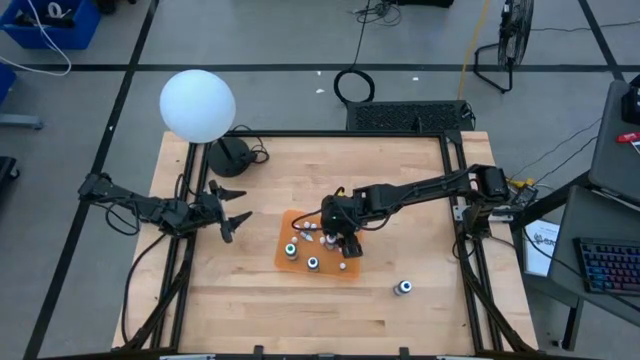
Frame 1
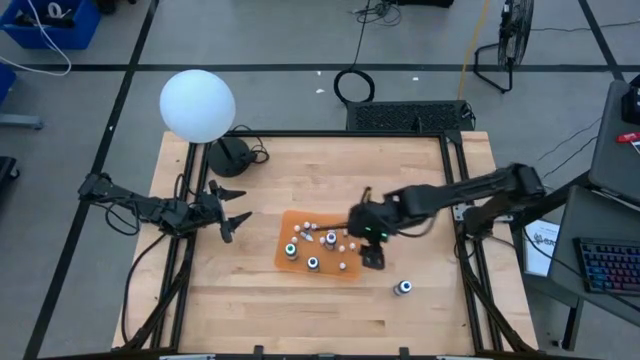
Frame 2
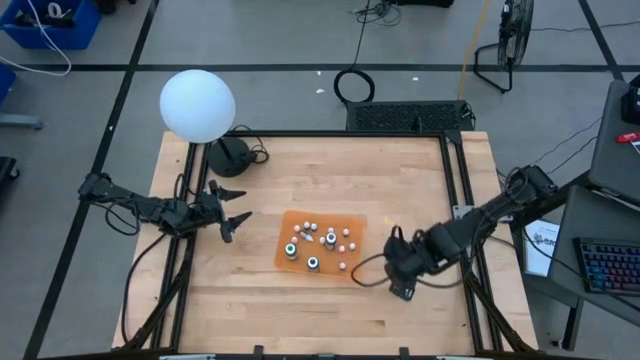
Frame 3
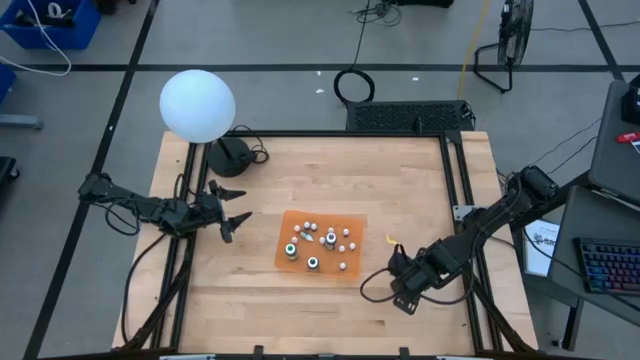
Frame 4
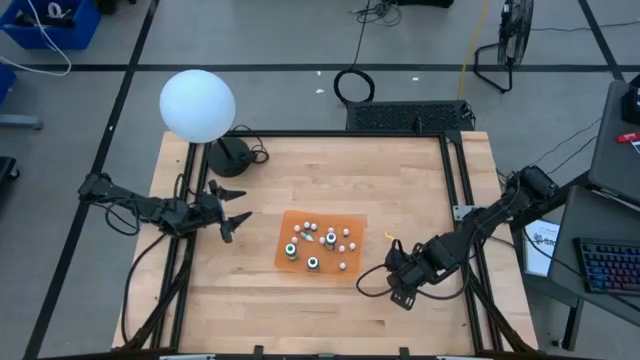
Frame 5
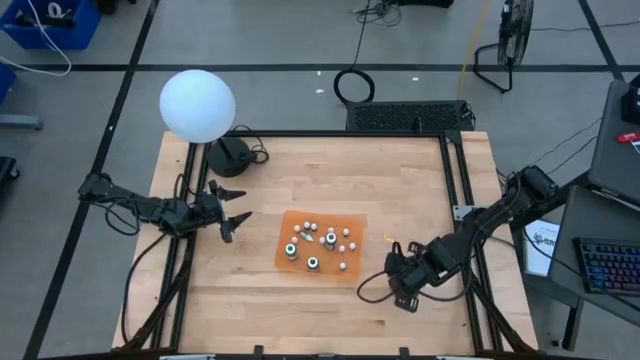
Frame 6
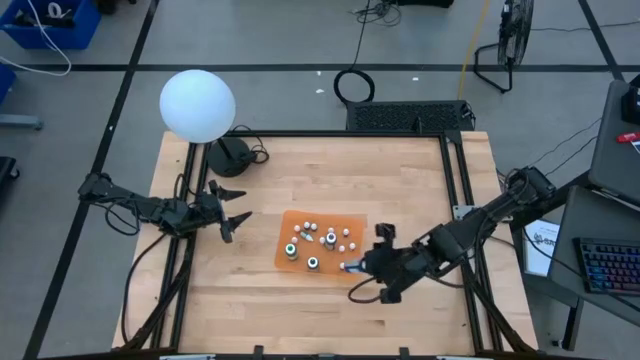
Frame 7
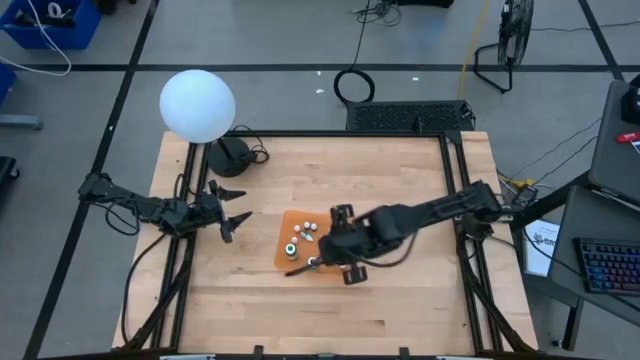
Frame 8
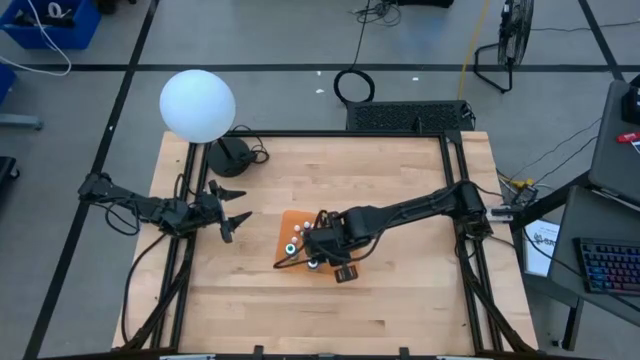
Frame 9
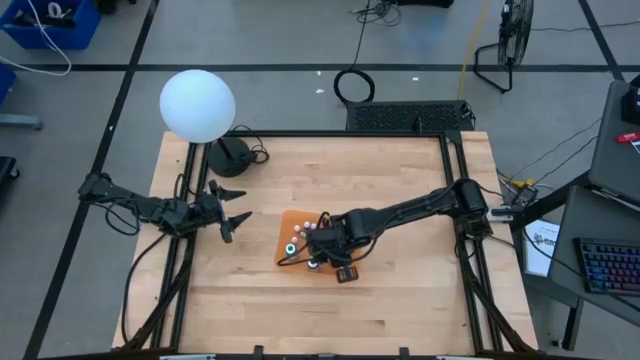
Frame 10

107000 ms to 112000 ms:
Task: Pick & Place food coloring
Put the large blue food coloring bottle into the orange bin

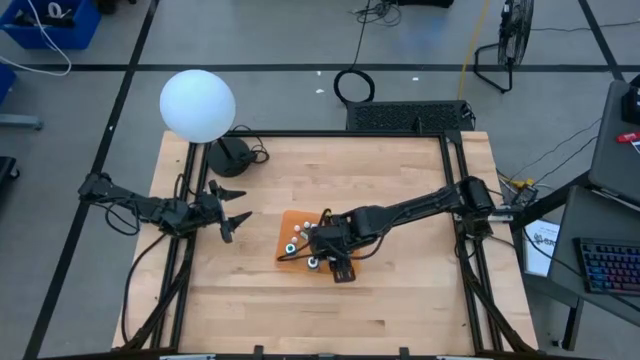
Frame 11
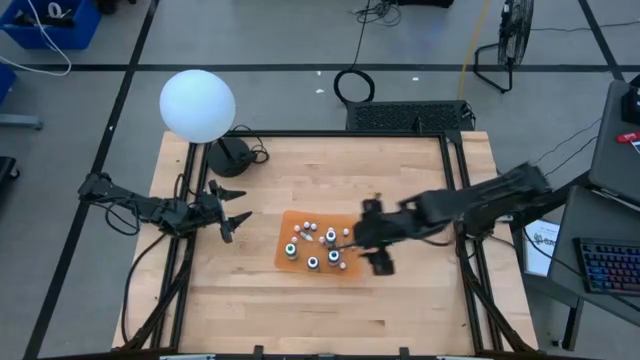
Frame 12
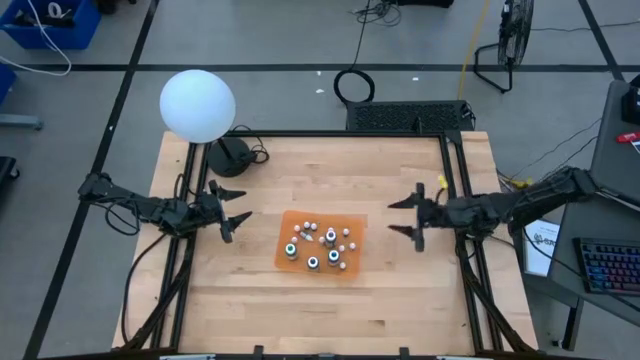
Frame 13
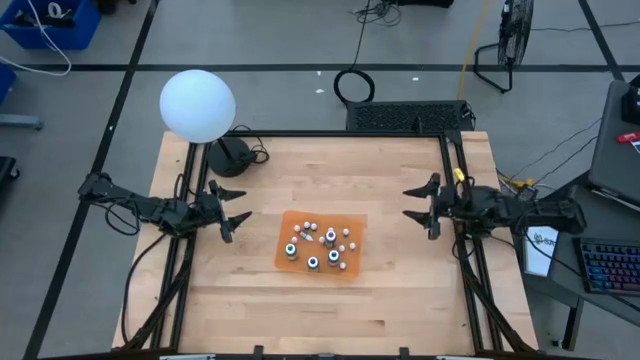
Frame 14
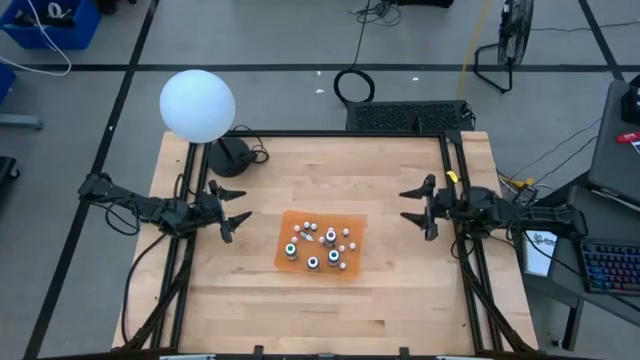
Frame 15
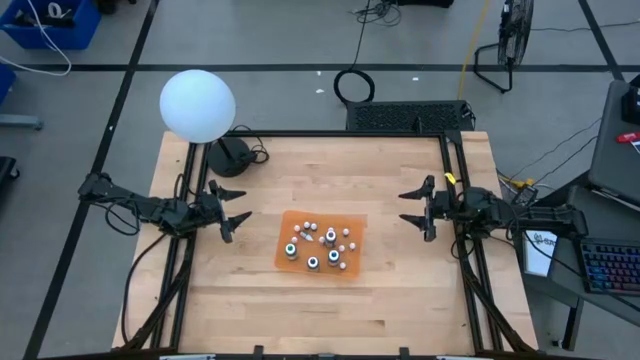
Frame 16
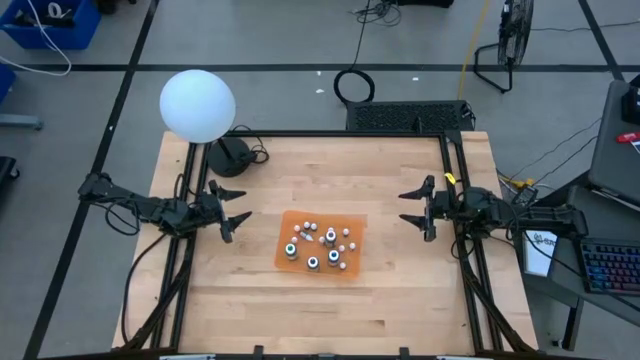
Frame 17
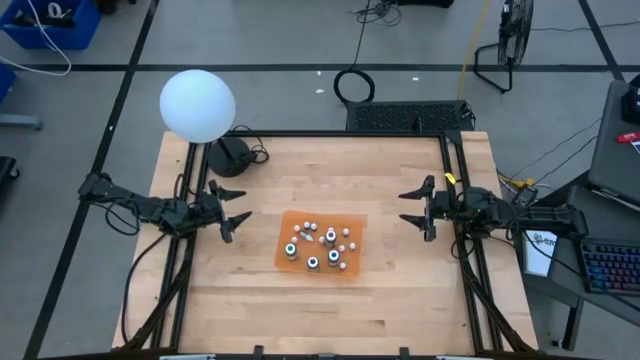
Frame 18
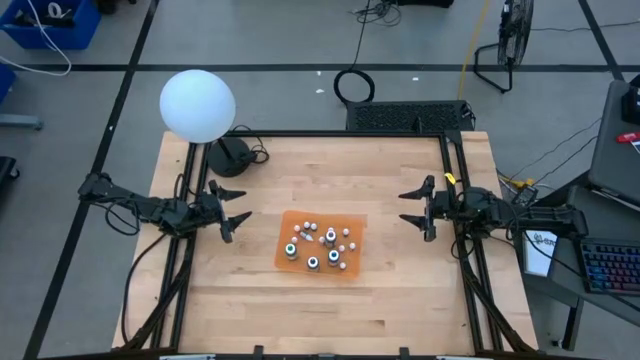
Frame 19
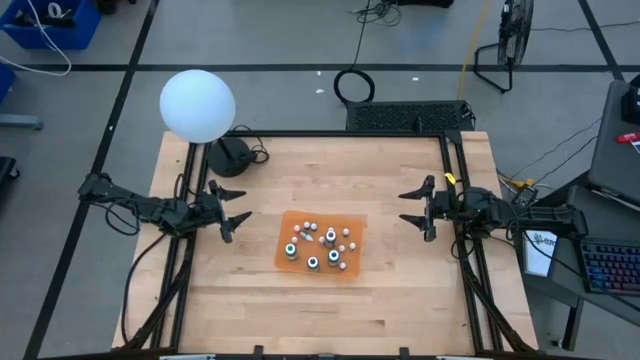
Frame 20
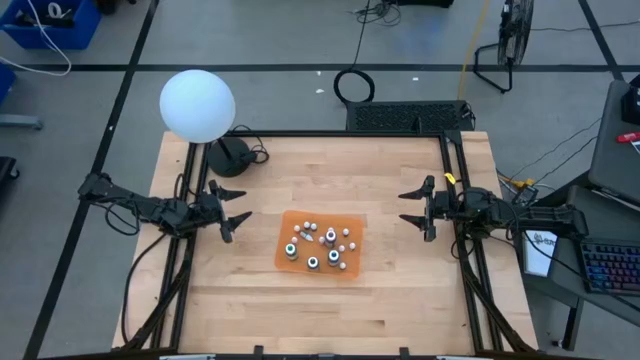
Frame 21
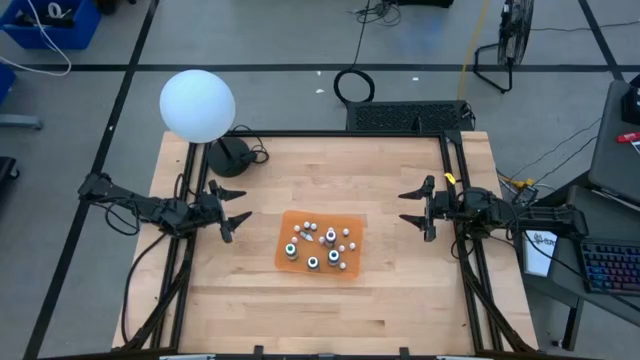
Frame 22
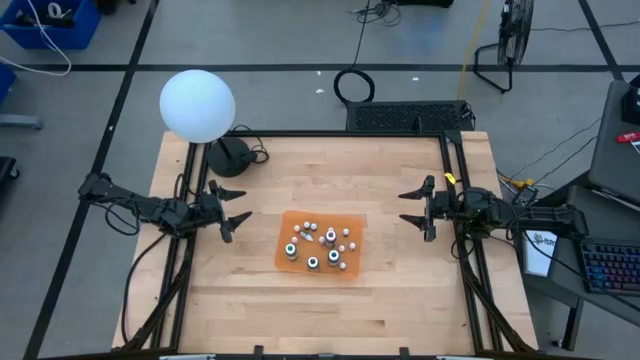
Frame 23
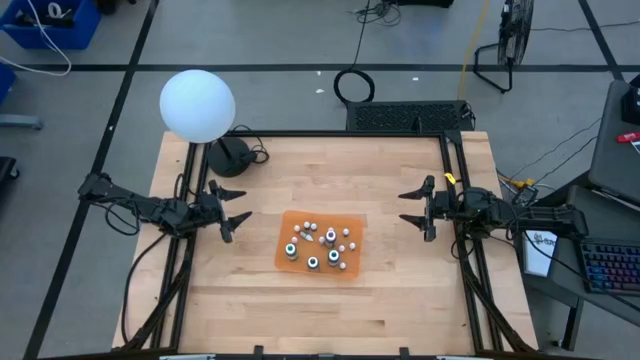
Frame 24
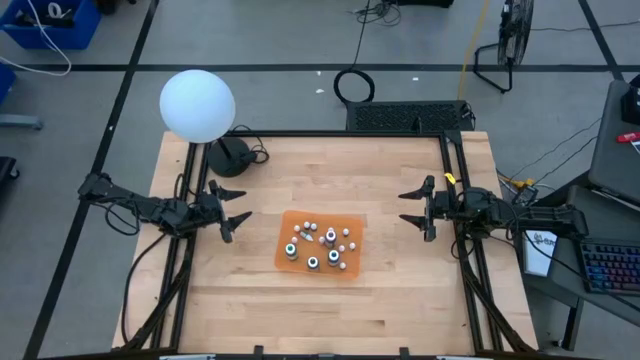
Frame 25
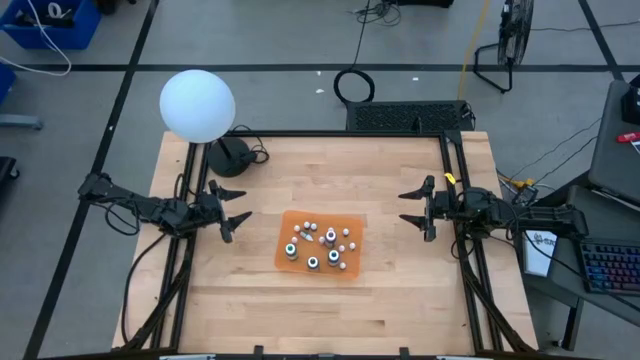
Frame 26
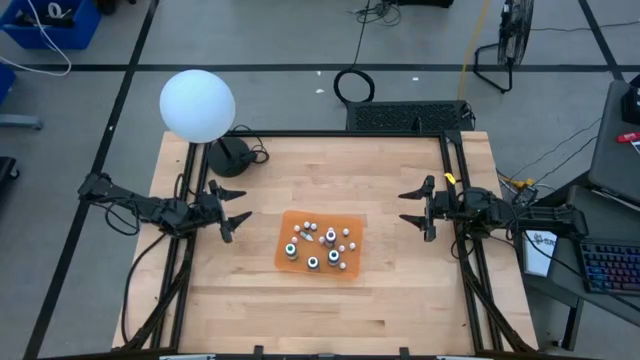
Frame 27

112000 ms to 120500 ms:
Return to Home Position

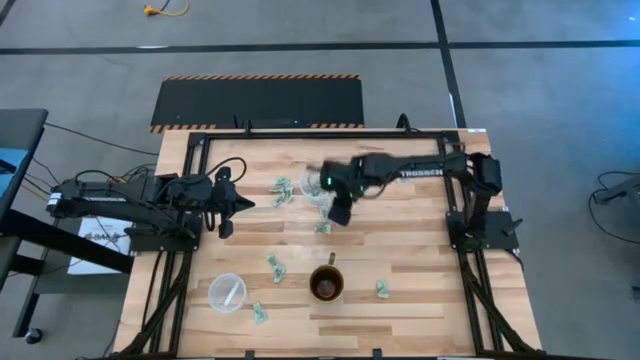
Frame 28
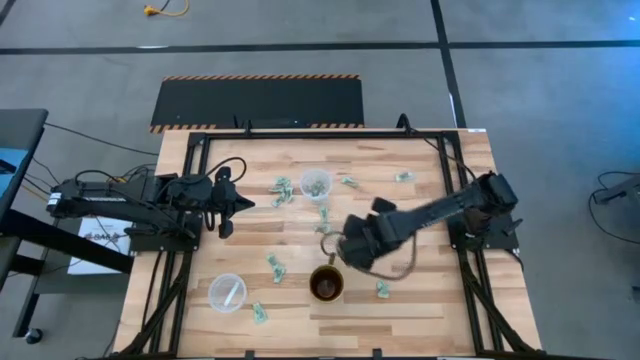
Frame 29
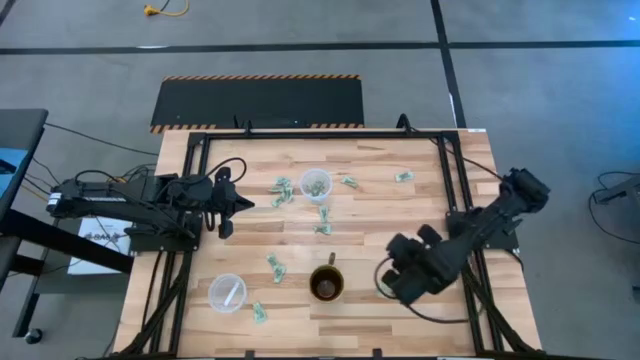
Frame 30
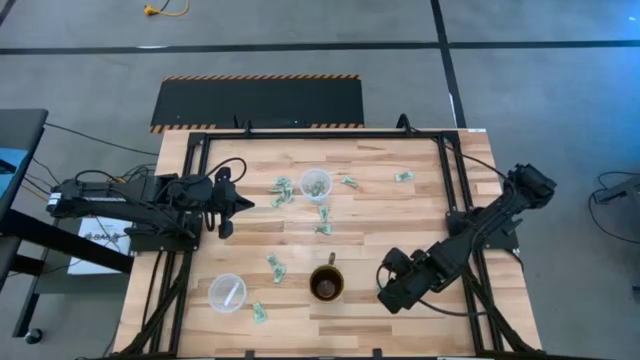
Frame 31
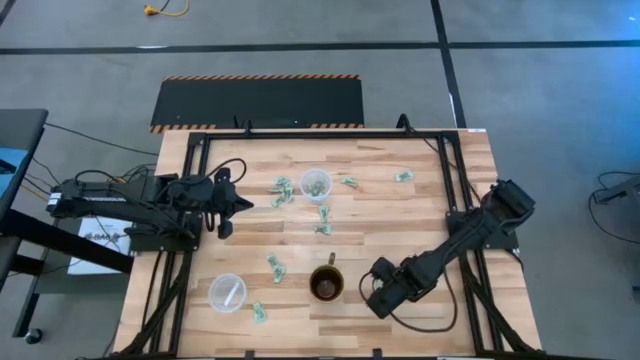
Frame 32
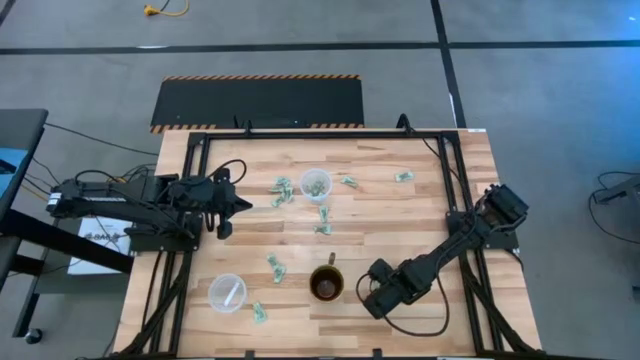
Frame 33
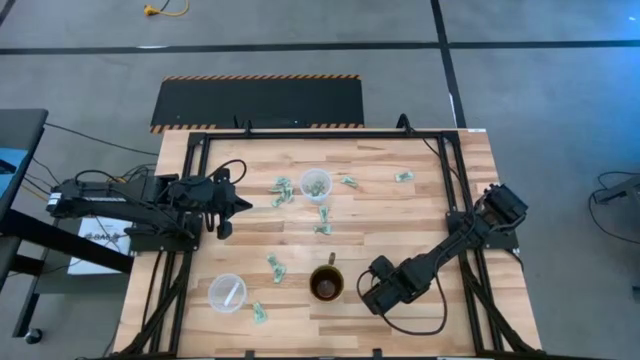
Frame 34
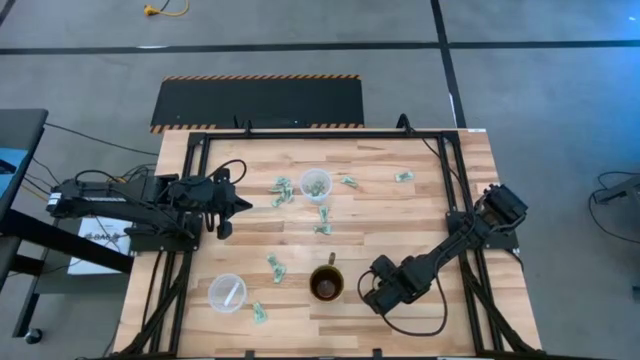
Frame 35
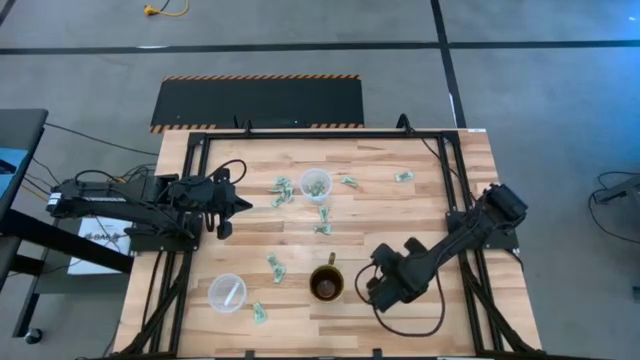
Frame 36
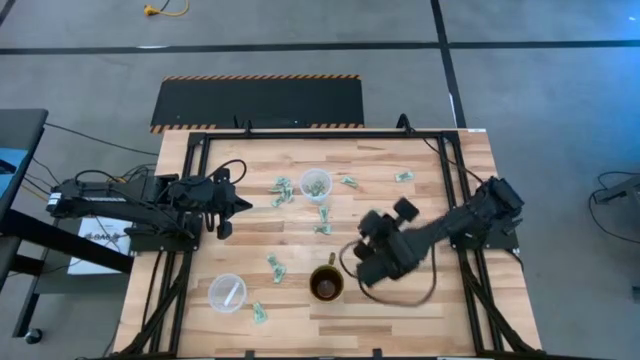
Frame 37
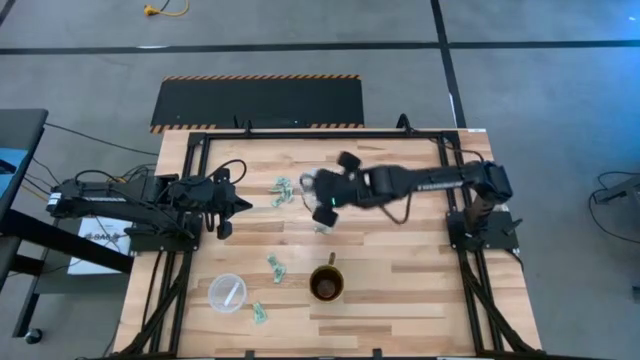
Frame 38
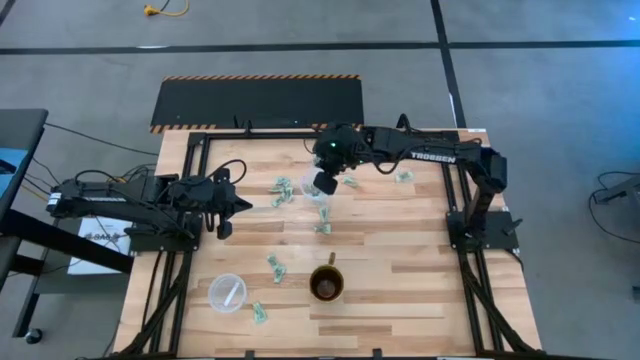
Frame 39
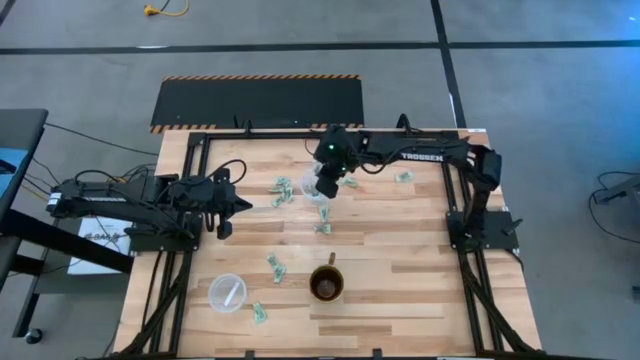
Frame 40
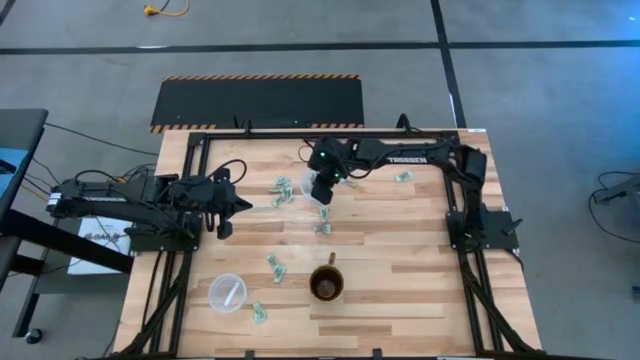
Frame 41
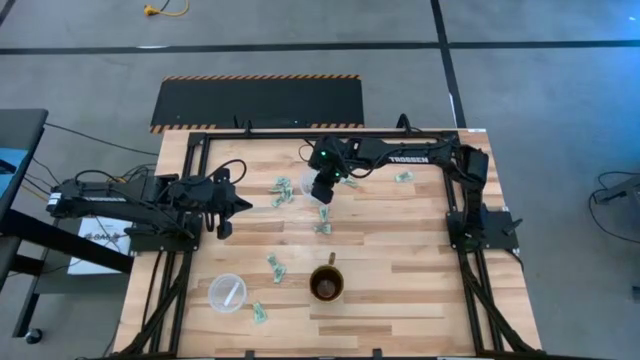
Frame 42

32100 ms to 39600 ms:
Task: Pick and place items into bin
Put the stevia packet into the top transparent bin
